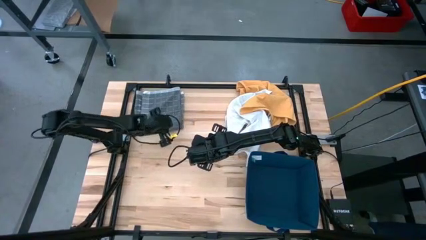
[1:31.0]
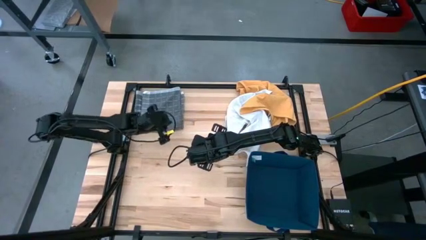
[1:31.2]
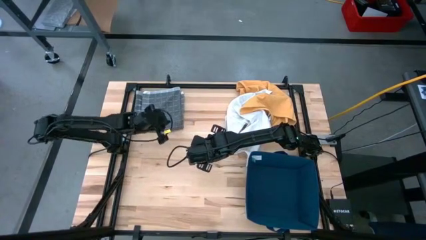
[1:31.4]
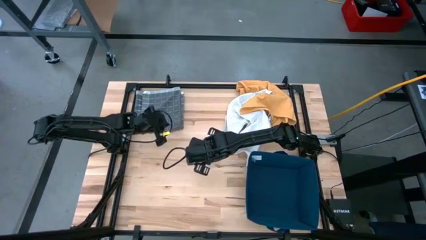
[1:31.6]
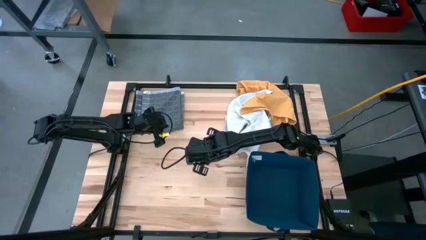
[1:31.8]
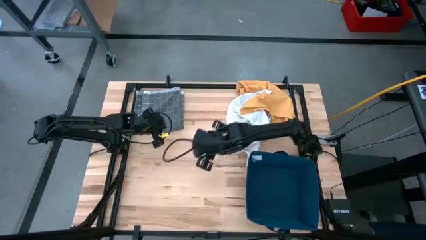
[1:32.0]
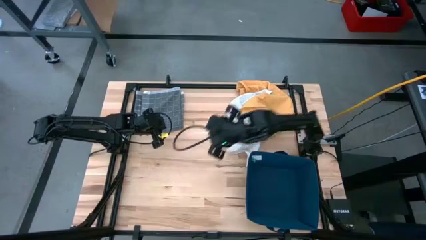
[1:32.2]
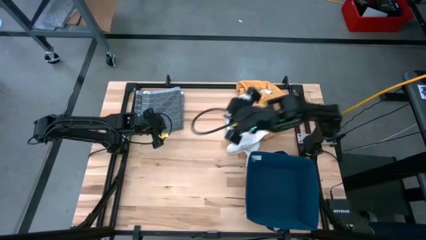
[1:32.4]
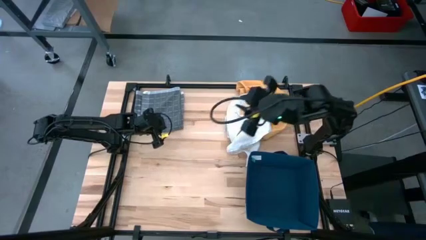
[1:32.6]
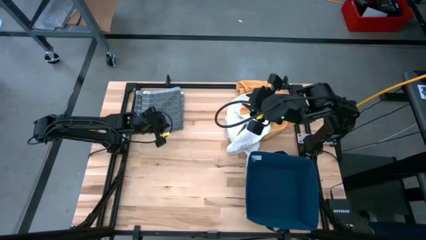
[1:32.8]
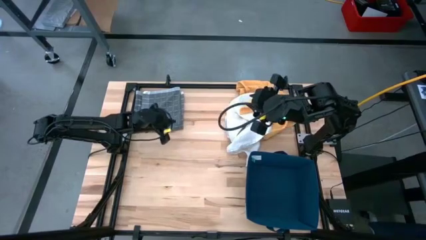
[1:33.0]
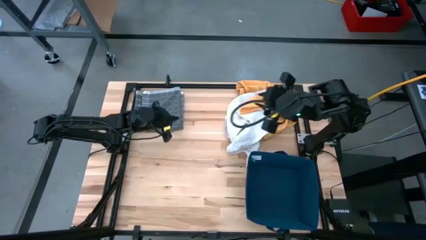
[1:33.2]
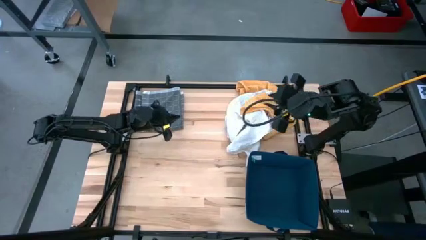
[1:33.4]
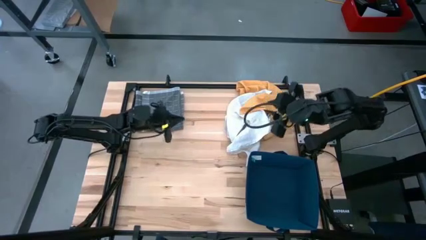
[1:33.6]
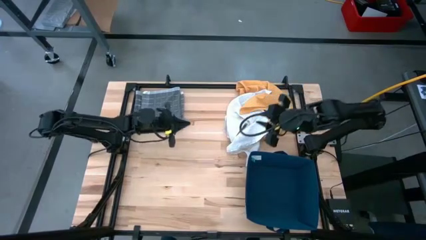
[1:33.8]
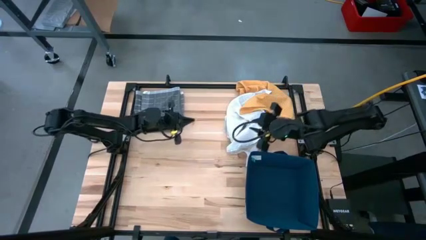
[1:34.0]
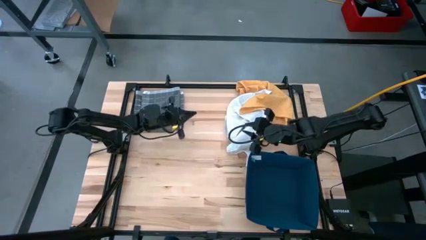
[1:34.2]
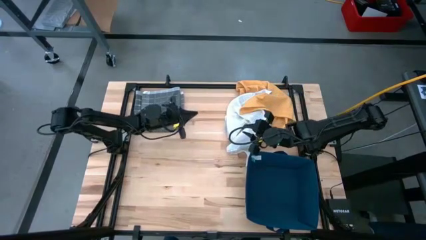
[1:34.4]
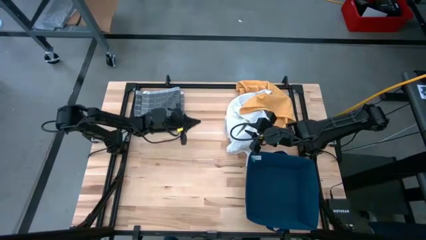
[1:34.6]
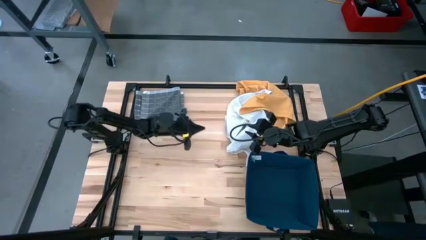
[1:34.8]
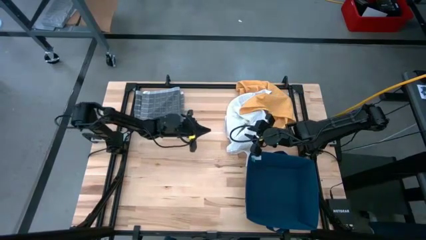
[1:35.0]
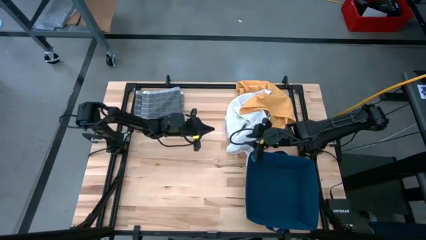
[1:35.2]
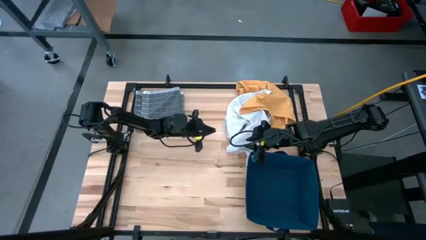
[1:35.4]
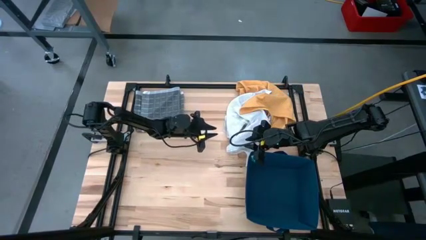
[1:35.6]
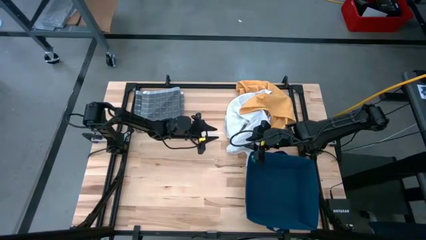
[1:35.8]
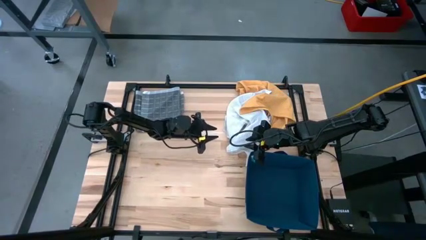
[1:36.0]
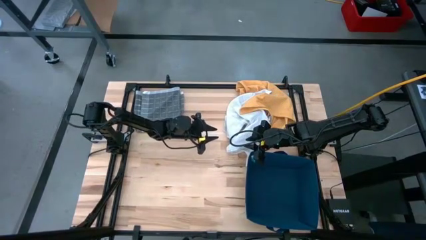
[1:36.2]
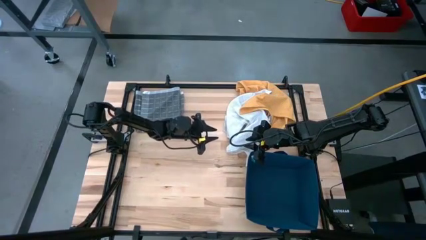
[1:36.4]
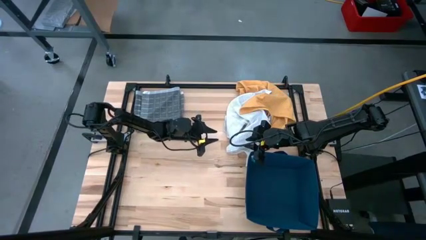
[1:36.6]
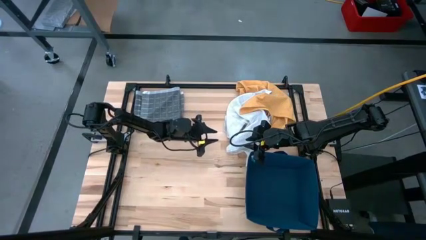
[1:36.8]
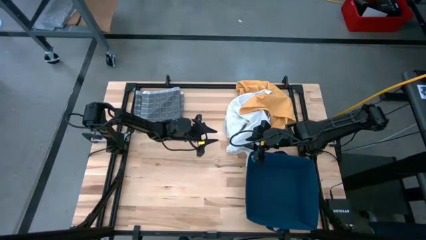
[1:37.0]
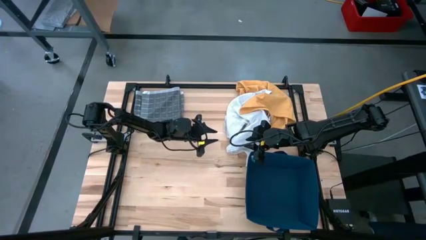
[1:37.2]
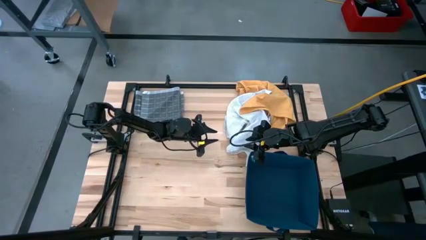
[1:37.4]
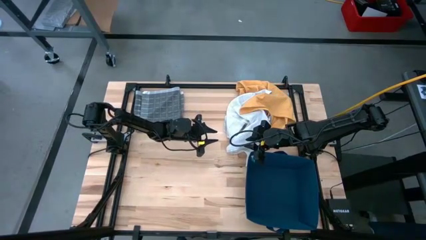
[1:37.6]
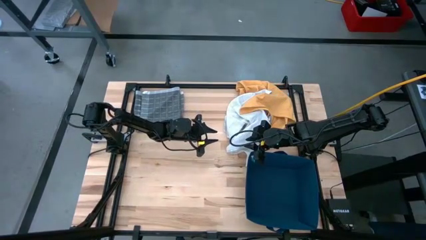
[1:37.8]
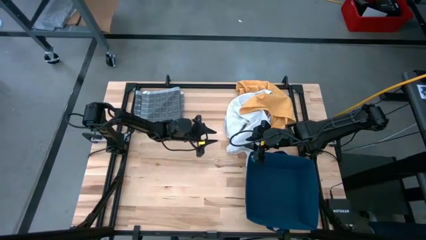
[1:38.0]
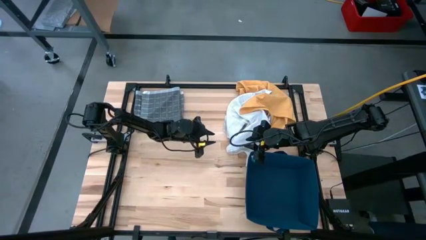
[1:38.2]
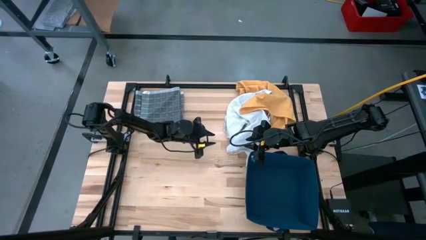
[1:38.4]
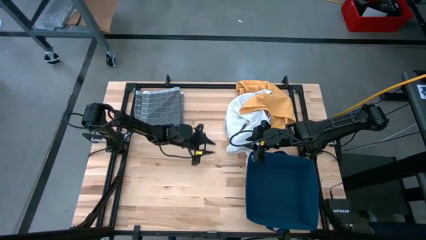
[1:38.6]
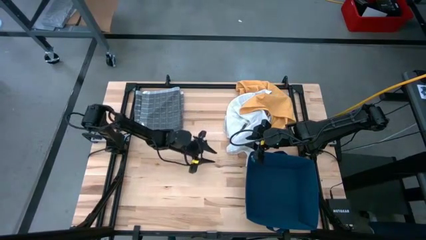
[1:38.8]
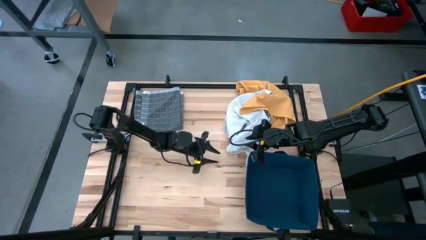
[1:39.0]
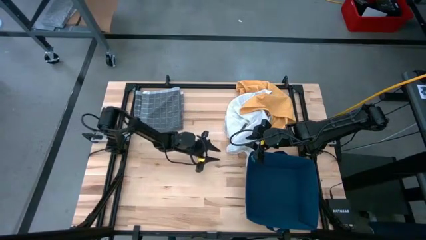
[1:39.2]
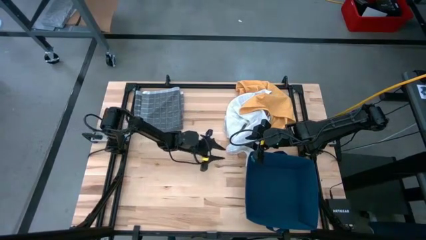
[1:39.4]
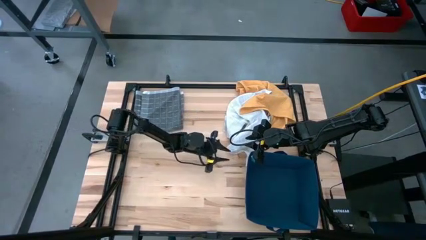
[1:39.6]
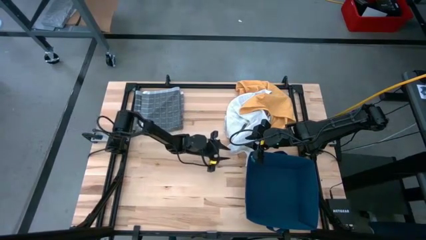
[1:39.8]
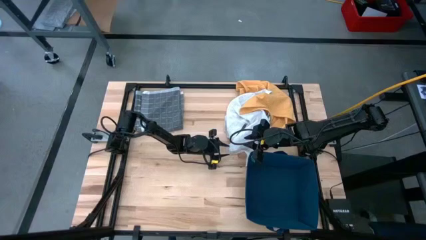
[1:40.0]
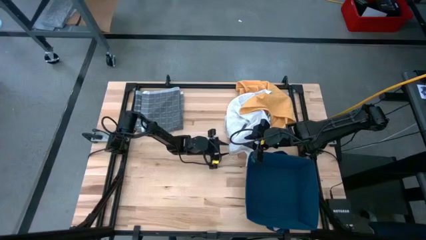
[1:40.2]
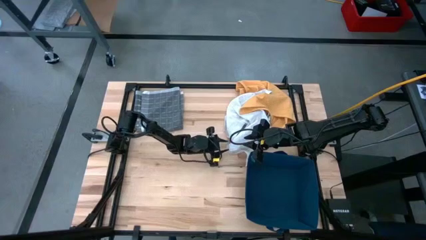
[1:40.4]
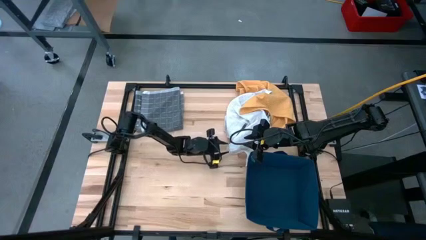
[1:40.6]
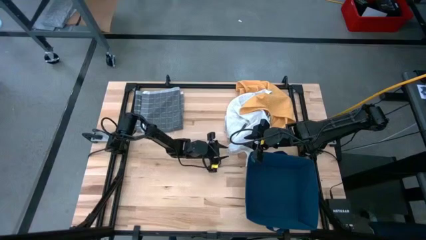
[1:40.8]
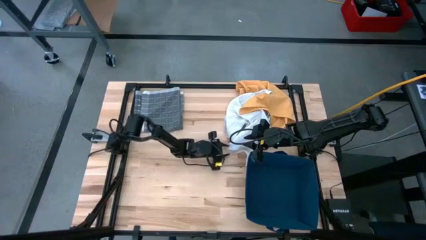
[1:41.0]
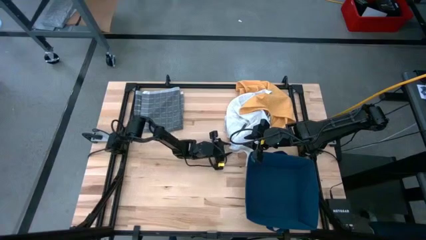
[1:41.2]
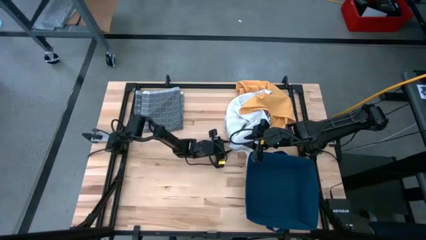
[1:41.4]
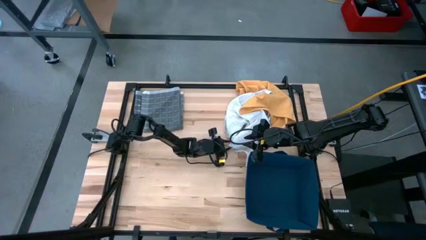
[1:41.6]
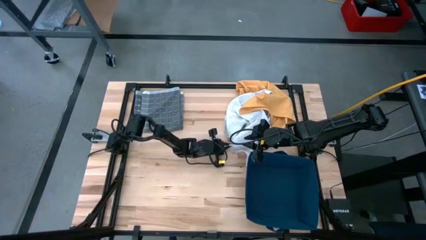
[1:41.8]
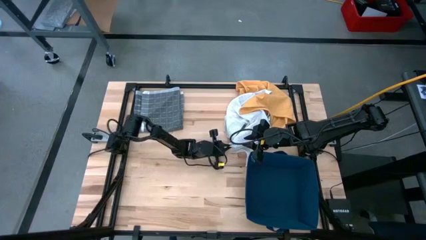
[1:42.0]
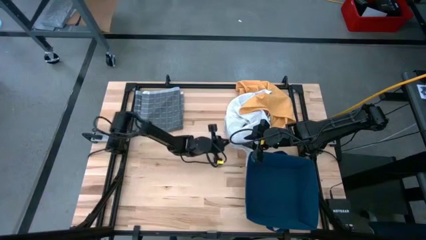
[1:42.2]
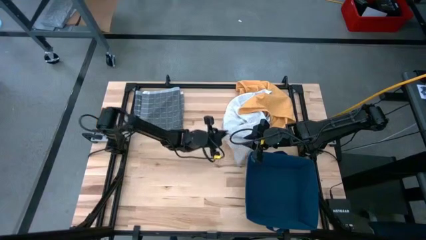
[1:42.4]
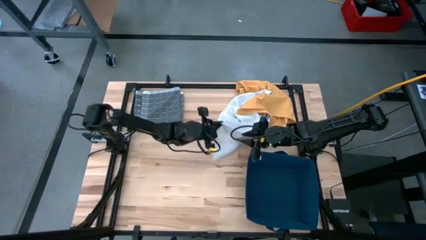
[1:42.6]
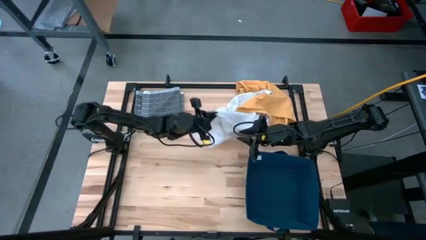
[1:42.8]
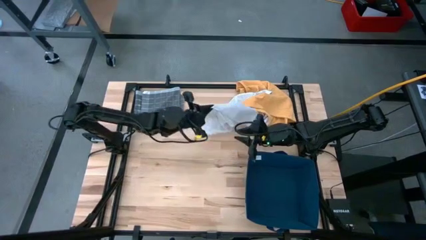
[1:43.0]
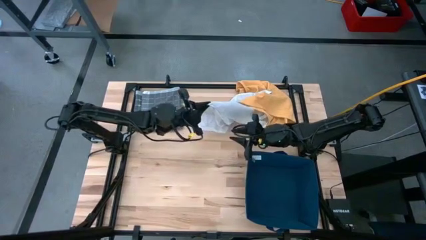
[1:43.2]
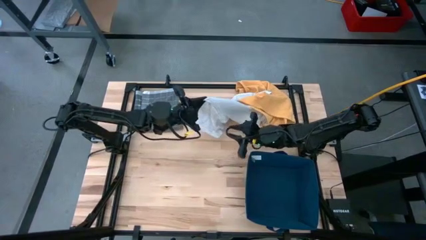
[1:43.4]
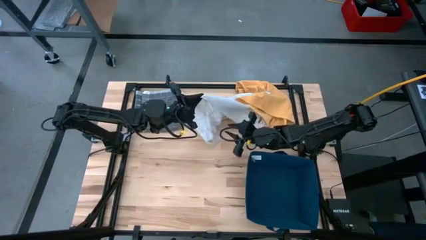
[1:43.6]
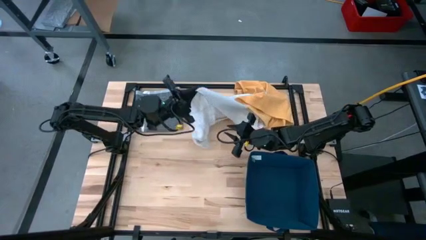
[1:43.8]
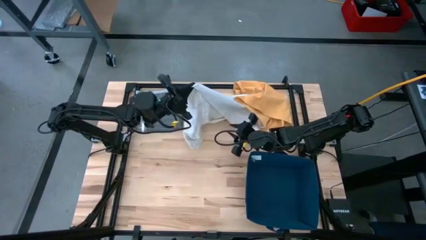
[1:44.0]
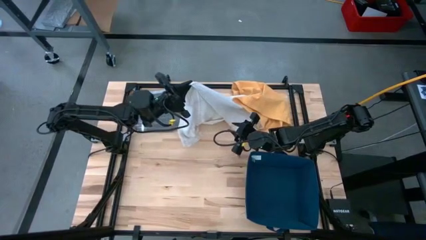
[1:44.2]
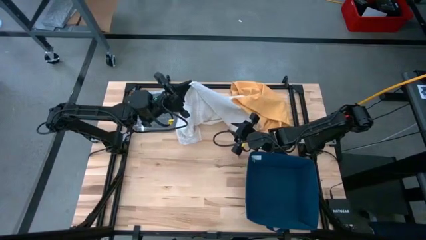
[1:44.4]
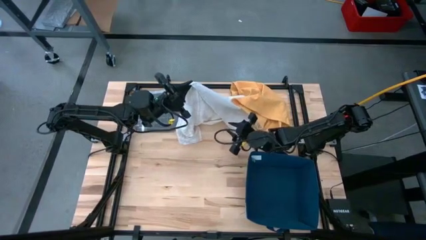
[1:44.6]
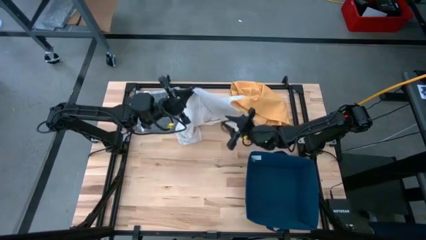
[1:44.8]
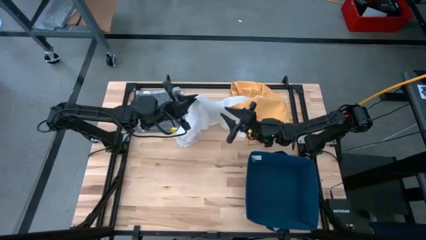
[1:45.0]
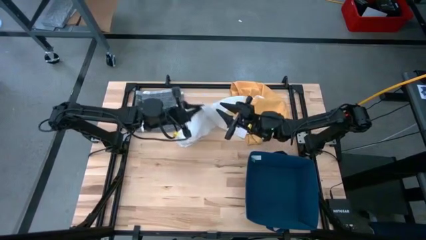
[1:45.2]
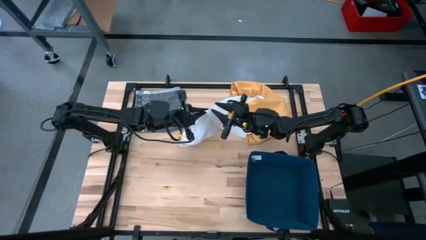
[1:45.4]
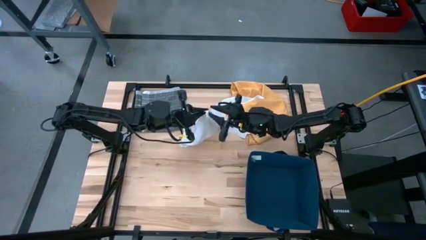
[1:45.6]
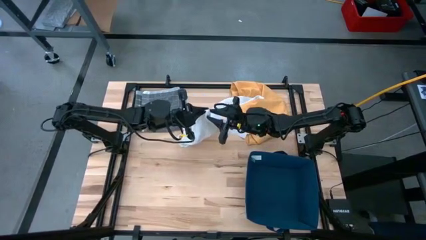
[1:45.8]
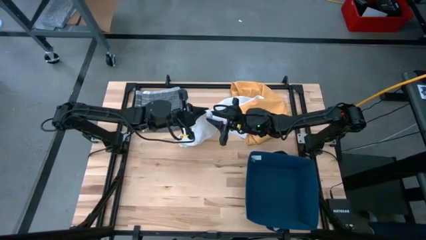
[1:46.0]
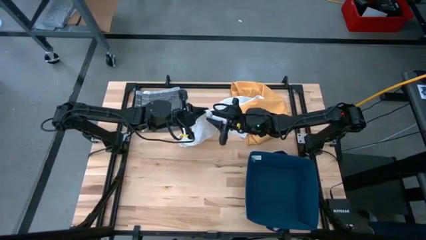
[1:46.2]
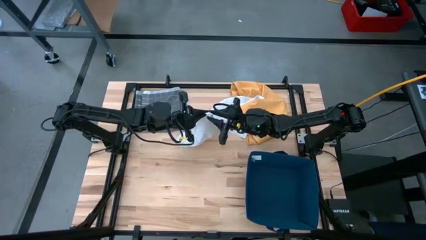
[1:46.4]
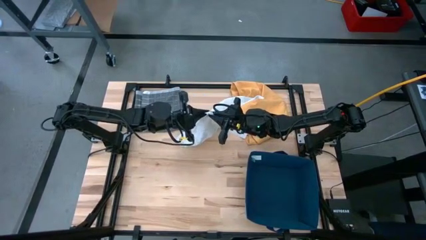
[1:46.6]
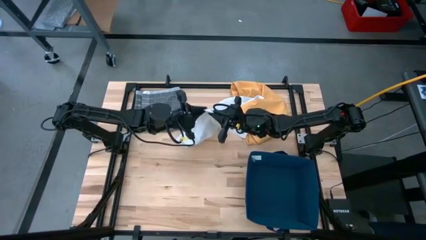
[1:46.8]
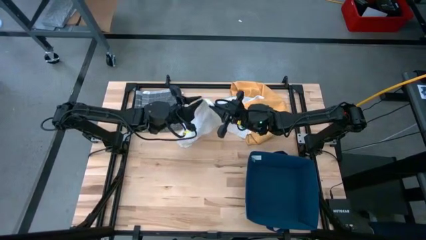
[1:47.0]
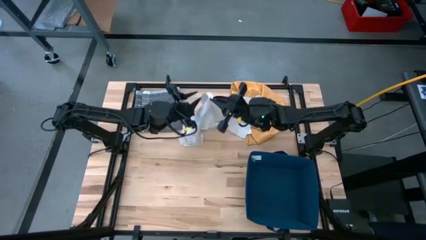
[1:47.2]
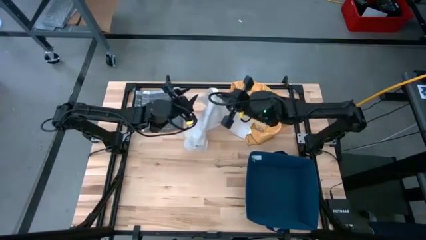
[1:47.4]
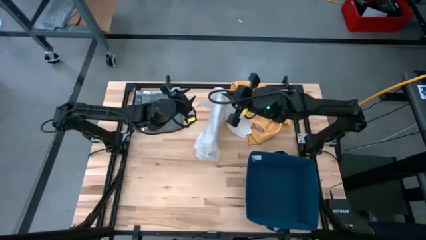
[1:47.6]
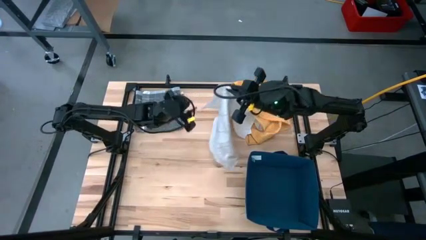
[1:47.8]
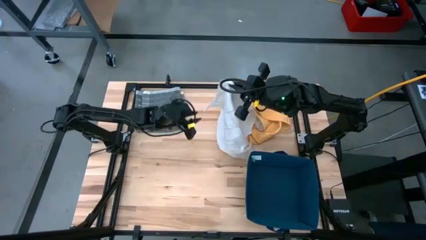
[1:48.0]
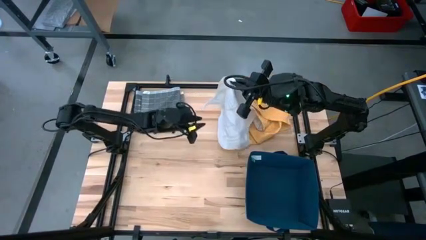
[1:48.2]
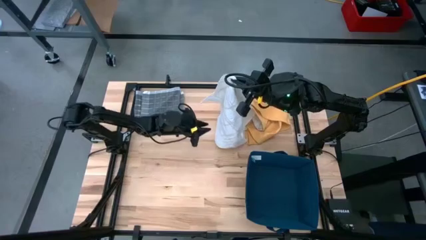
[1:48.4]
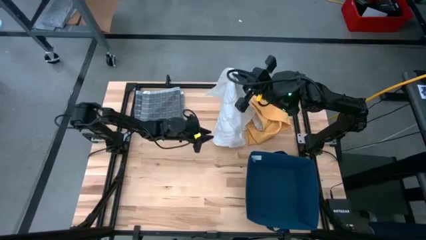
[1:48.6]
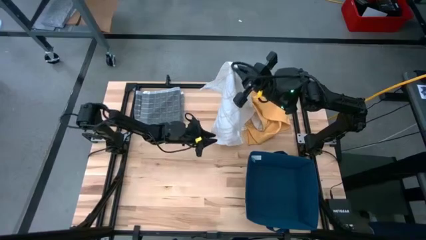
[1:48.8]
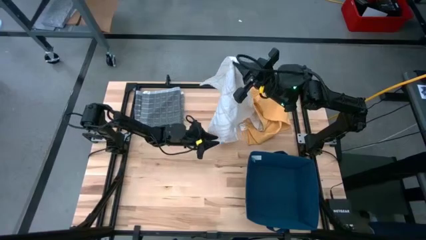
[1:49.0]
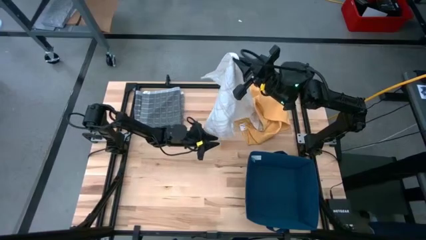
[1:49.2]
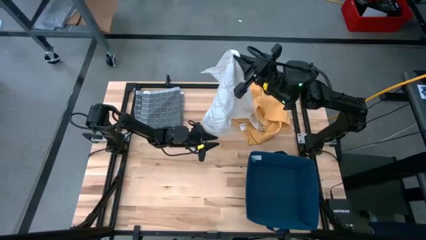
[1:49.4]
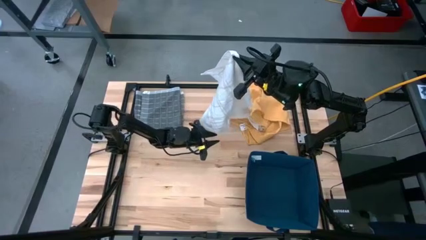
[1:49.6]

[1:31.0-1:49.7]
Task: Fold towel
Fold the white towel
